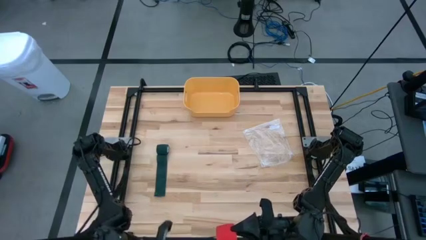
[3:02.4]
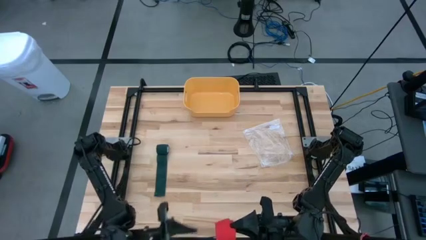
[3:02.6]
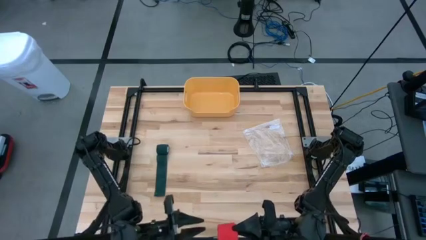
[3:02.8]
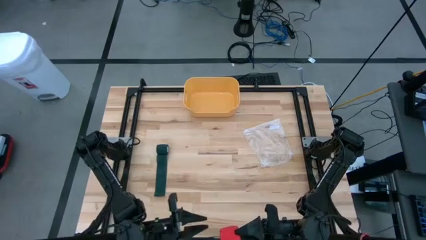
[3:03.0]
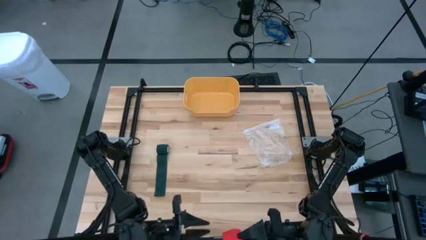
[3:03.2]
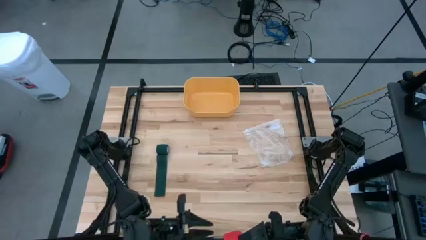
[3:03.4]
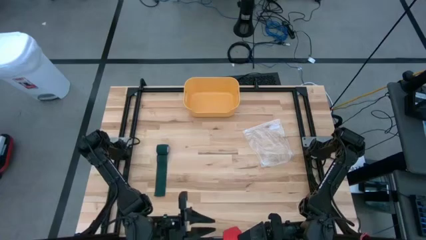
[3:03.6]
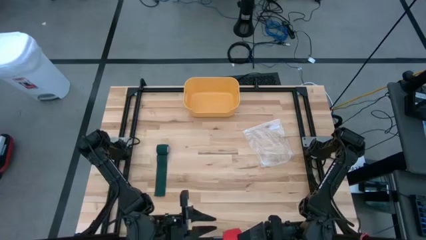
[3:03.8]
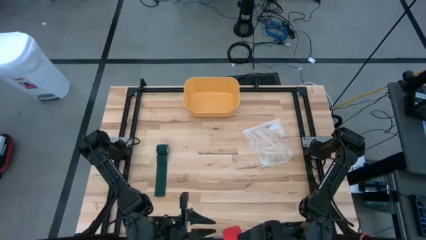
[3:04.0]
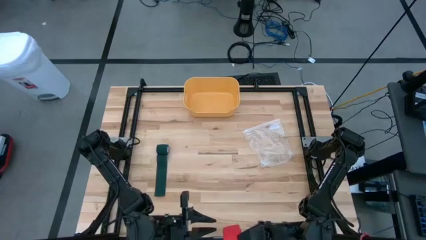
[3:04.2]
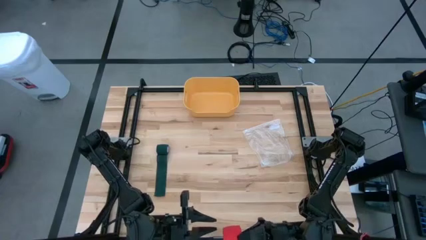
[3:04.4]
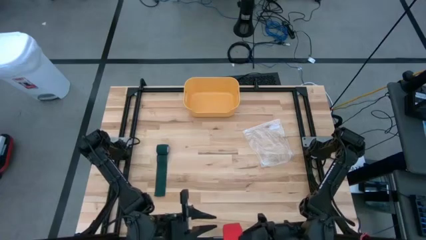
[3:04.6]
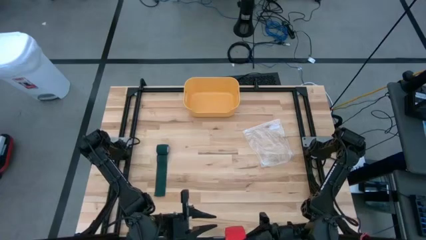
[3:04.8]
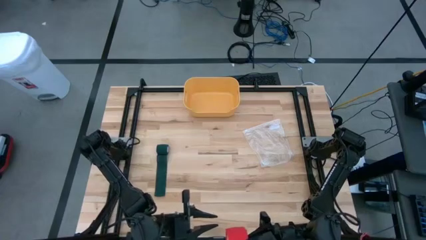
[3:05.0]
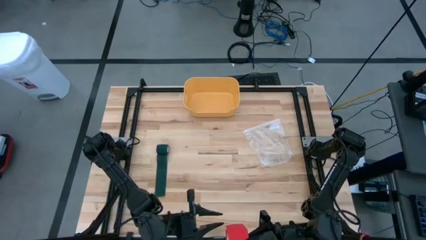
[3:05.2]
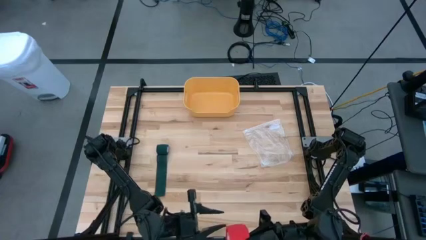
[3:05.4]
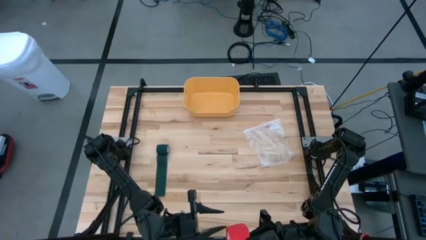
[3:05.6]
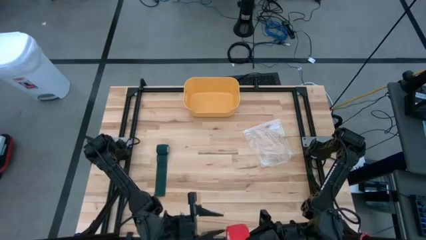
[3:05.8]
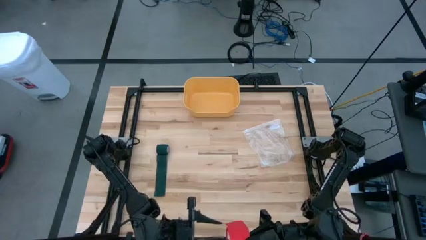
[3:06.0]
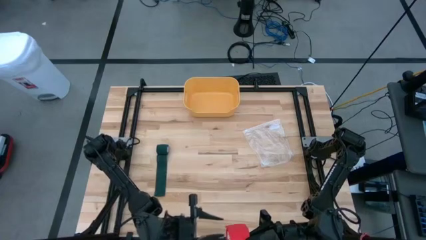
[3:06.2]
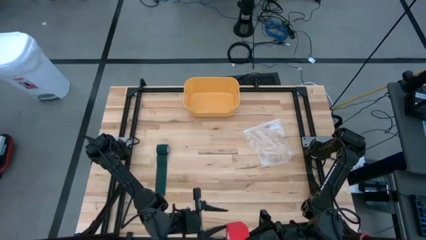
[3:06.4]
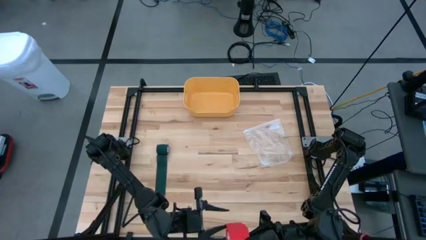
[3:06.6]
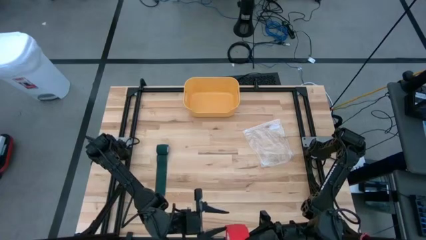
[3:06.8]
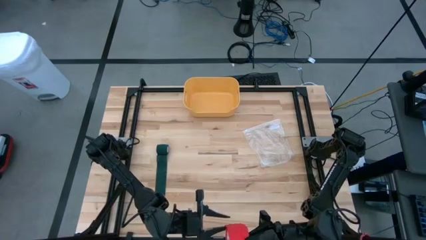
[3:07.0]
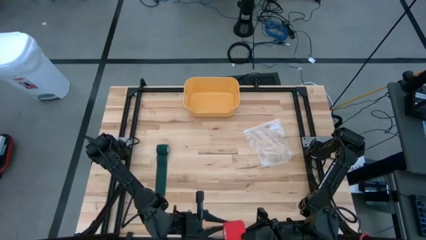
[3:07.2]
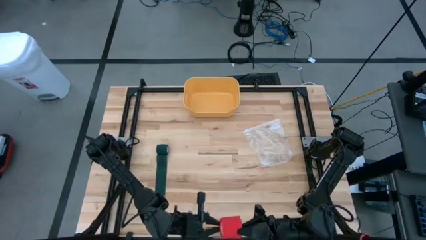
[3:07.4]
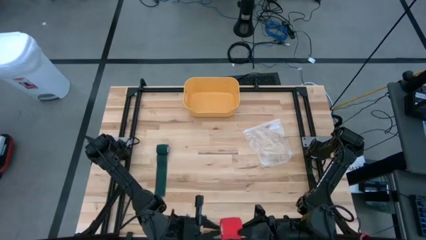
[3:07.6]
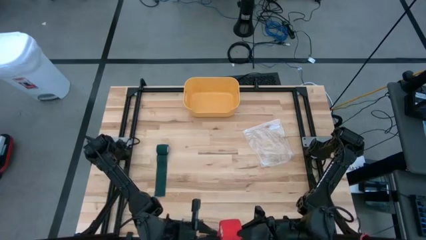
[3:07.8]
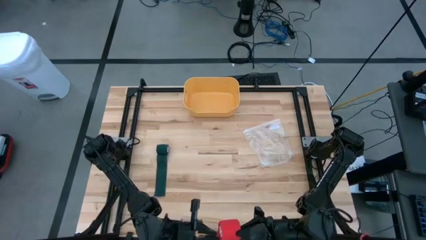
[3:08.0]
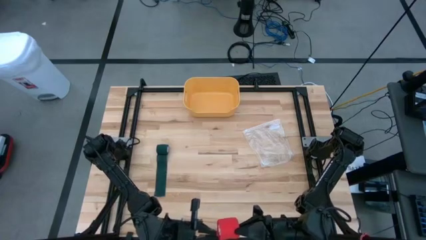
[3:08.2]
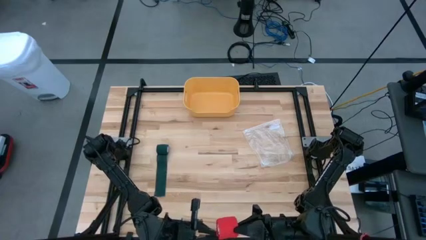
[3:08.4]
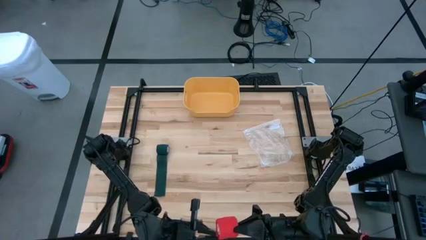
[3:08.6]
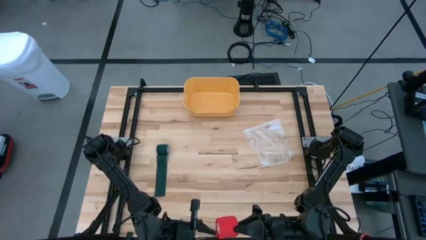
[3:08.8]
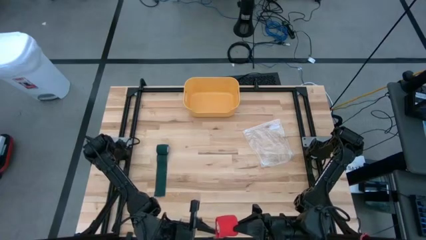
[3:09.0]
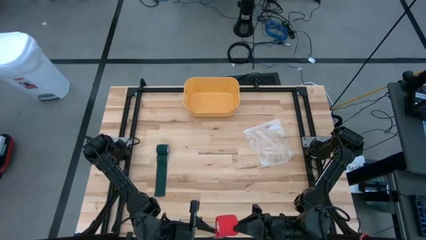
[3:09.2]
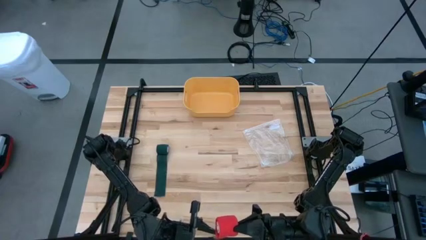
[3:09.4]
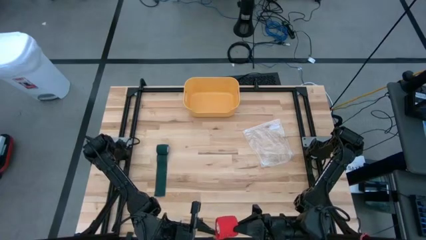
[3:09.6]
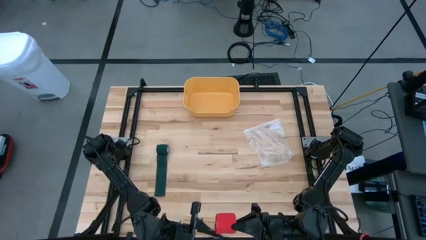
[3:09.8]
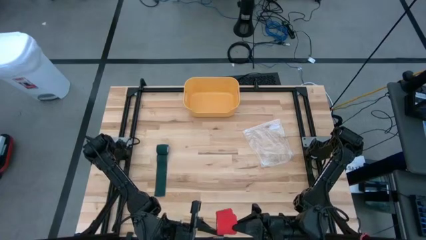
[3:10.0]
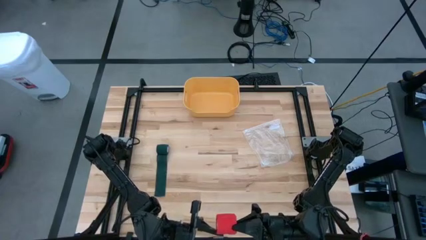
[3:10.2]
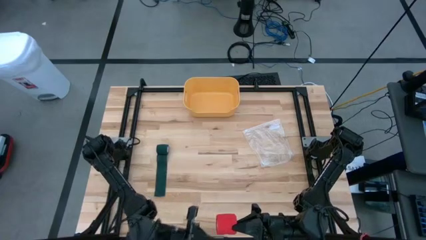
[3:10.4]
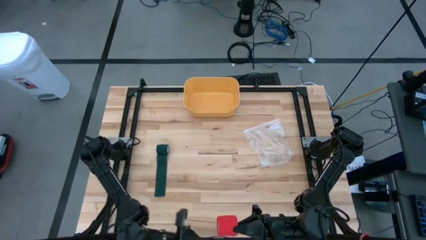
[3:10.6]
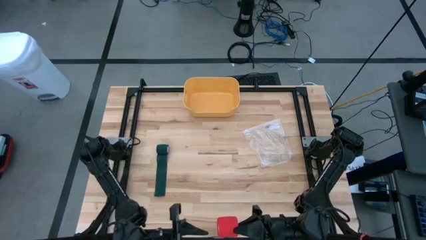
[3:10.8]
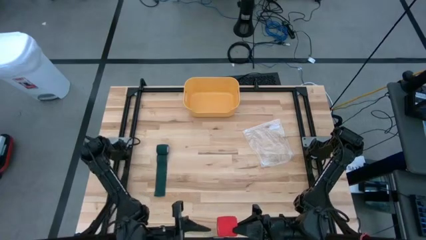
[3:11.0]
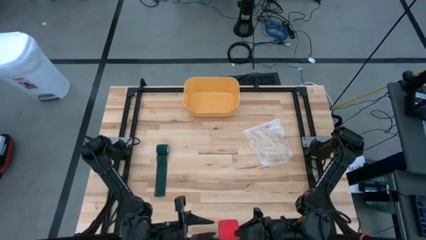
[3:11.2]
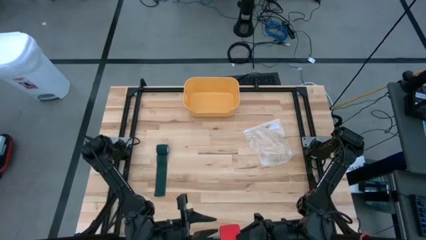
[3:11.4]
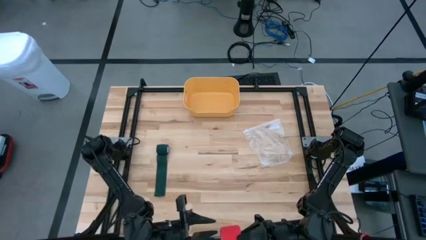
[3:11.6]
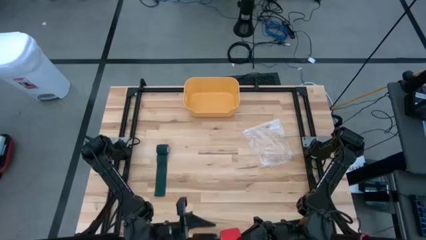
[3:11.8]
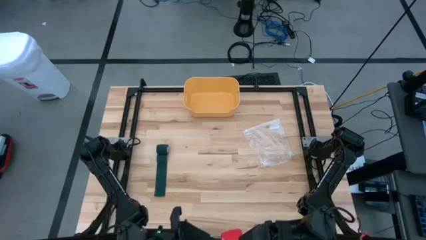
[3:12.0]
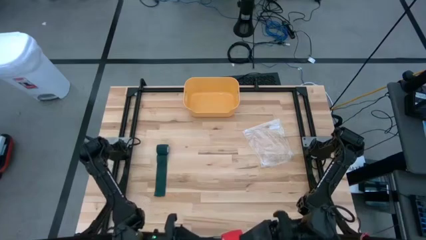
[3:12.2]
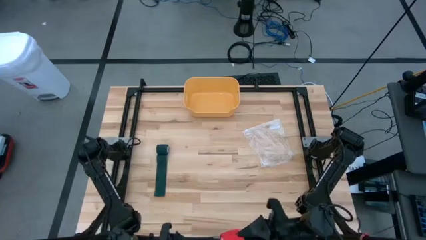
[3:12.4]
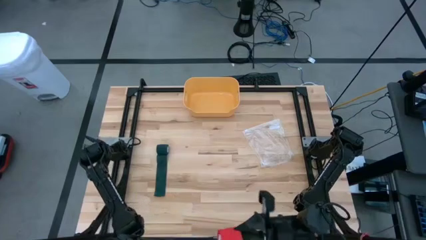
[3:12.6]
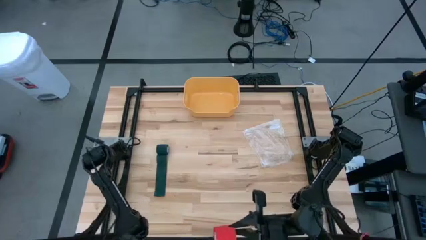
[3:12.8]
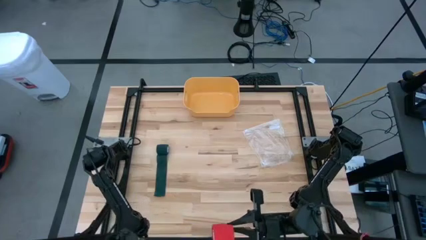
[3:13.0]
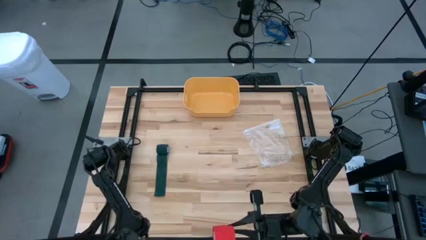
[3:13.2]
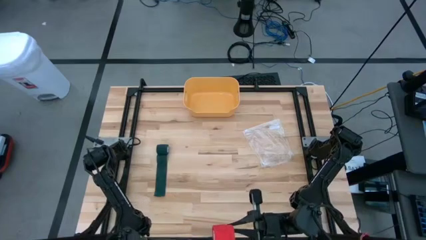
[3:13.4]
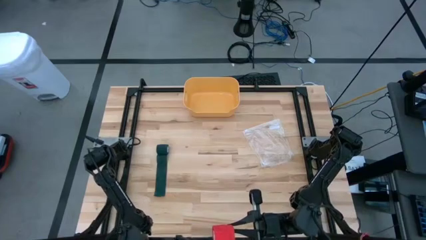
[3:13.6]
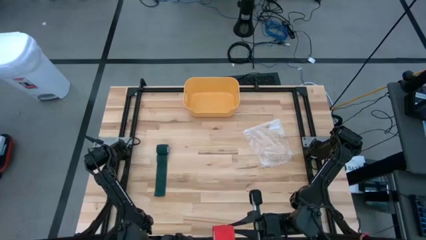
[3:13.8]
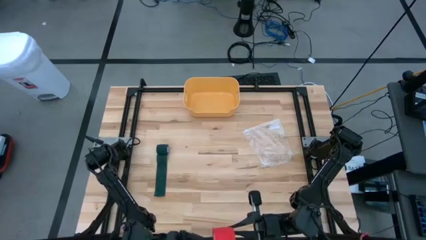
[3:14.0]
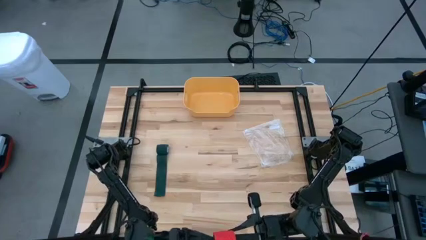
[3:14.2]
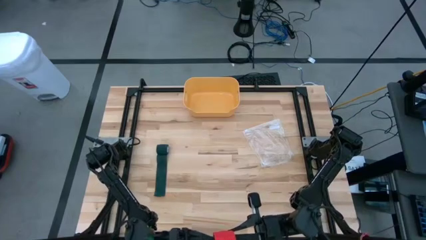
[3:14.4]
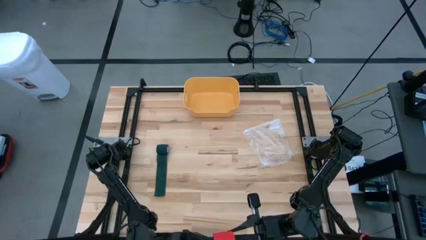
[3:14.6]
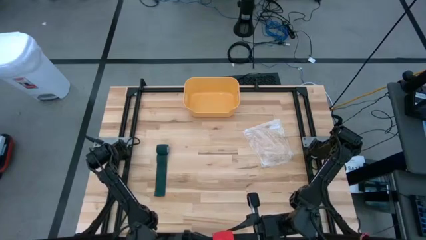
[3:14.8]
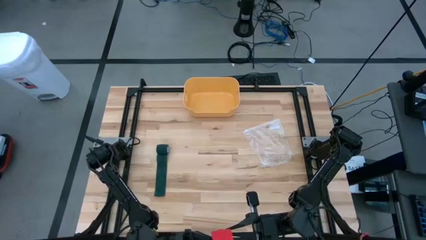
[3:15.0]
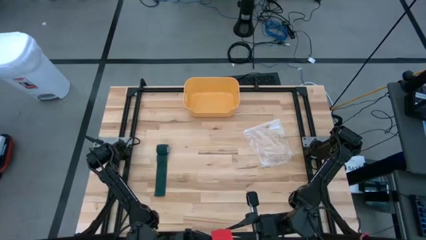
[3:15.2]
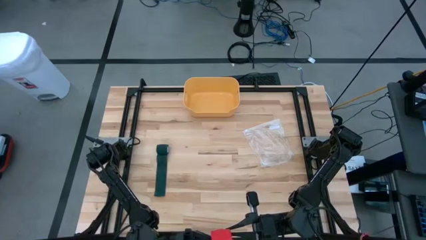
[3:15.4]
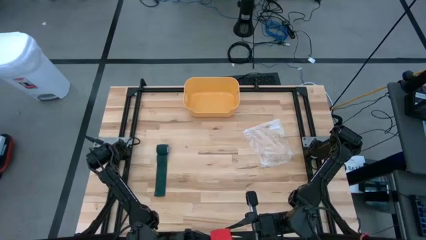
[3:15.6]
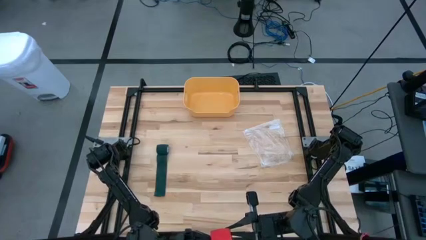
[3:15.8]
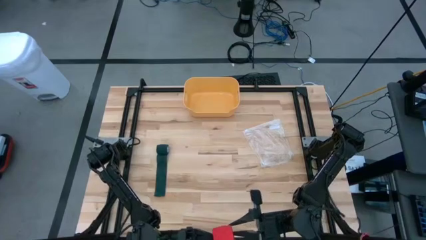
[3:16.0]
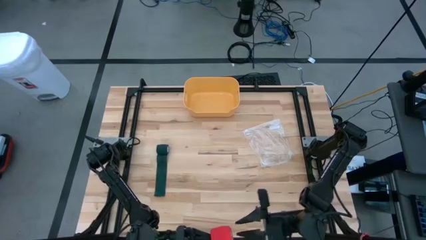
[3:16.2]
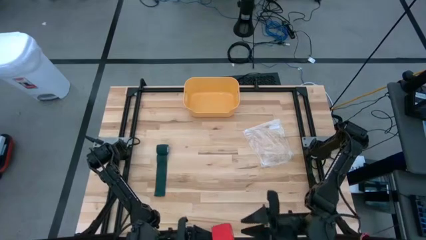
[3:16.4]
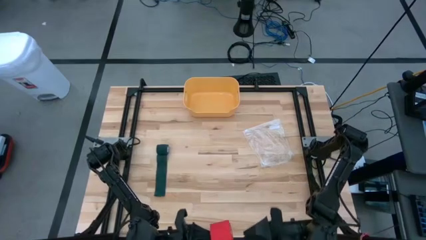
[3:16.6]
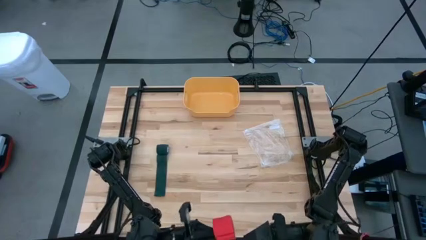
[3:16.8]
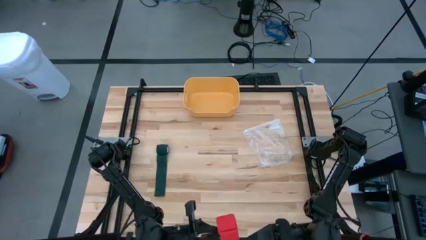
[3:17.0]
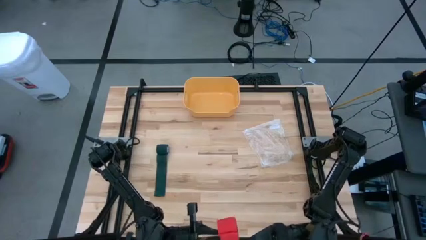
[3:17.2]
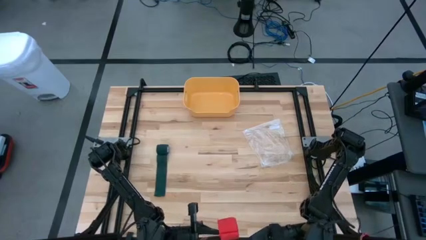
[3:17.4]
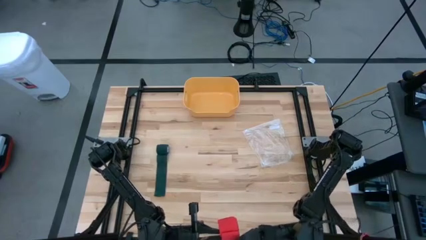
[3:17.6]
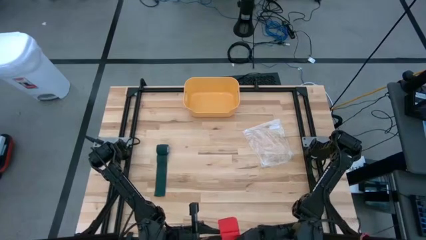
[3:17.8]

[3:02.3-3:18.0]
Task: Roll bandage
Roll the red bandage
